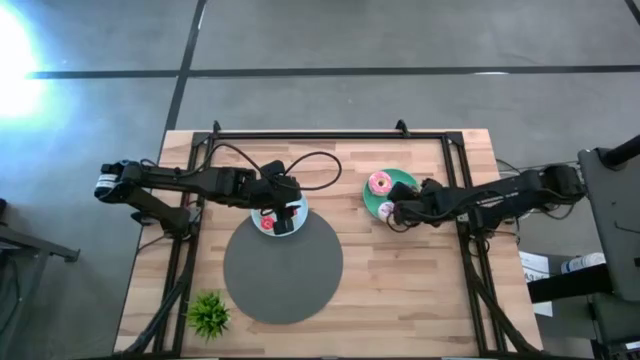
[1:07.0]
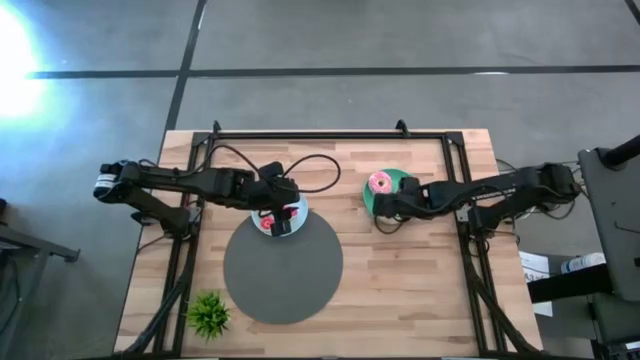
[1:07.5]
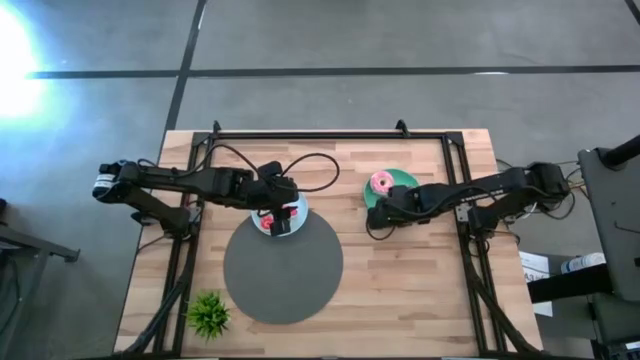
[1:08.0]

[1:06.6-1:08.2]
Task: Pick & Place donuts
Adjust the big purple donut on the blue plate

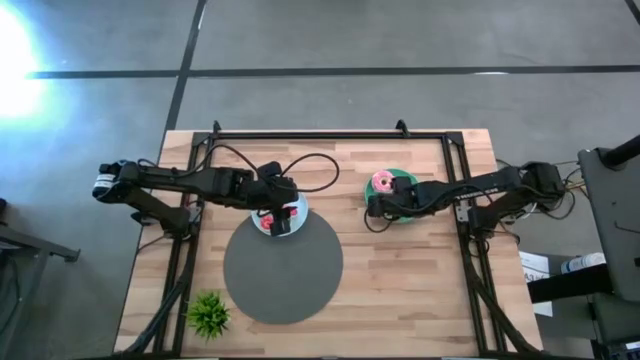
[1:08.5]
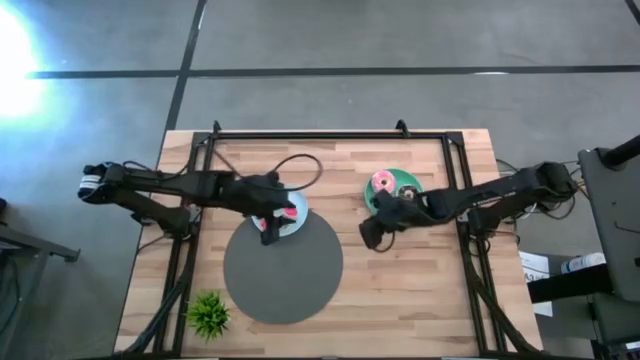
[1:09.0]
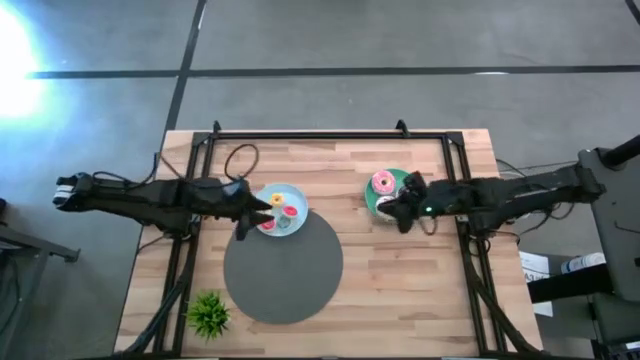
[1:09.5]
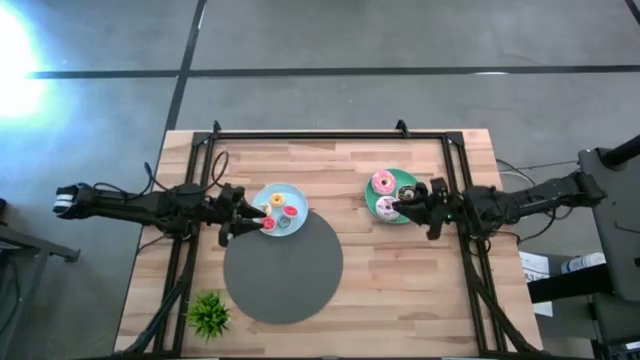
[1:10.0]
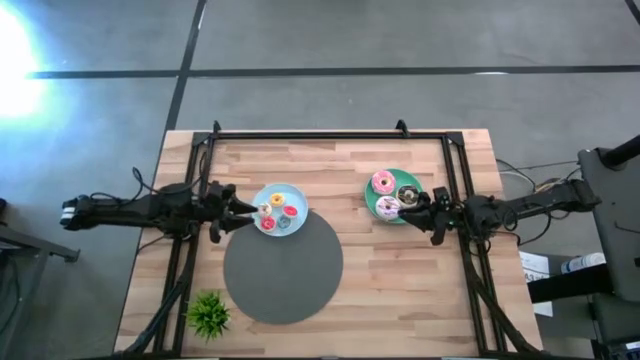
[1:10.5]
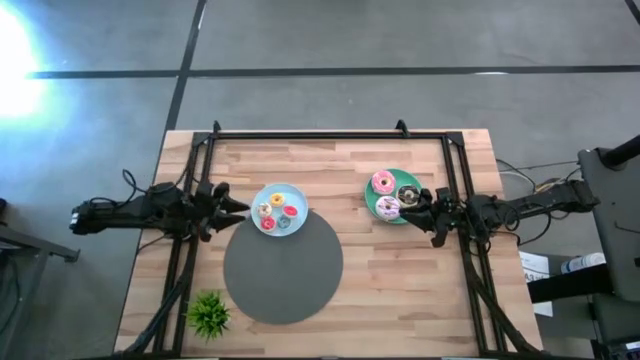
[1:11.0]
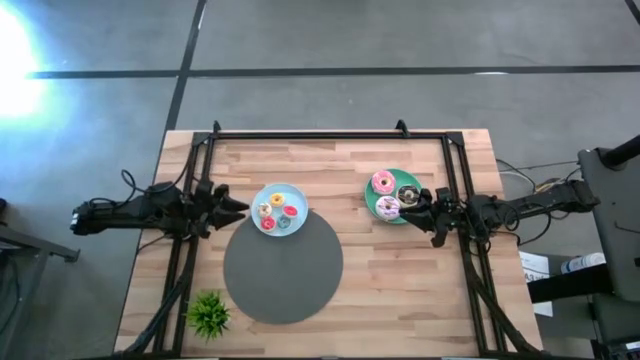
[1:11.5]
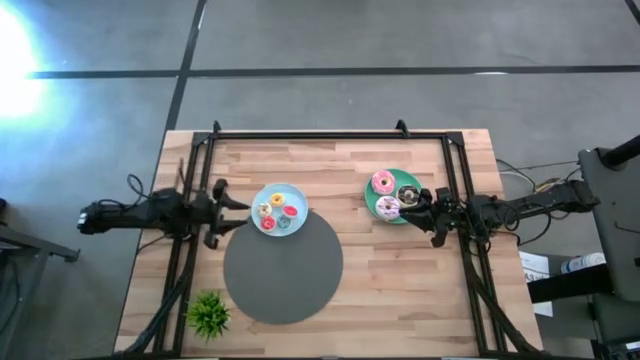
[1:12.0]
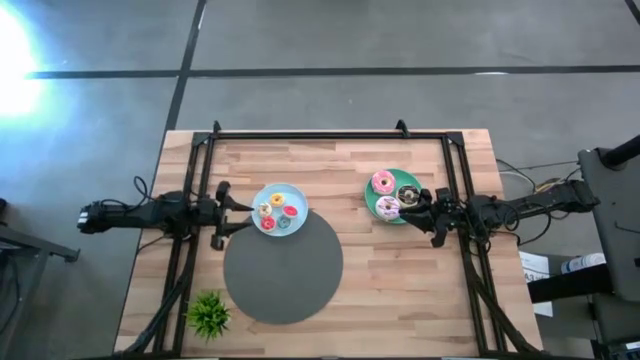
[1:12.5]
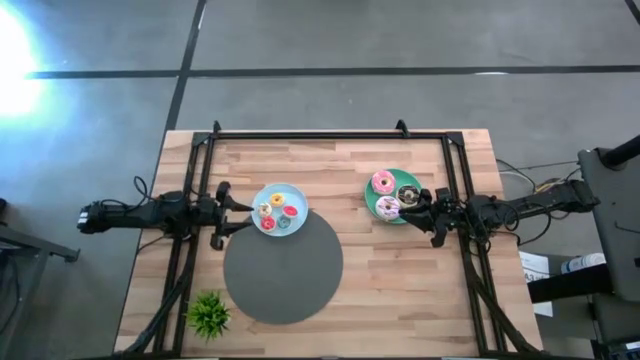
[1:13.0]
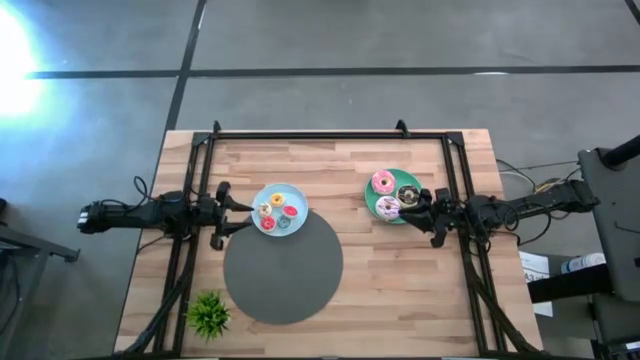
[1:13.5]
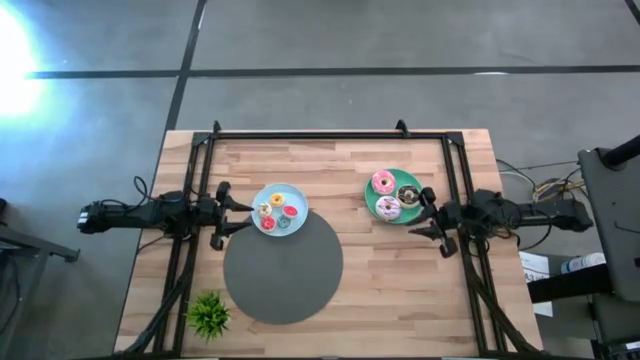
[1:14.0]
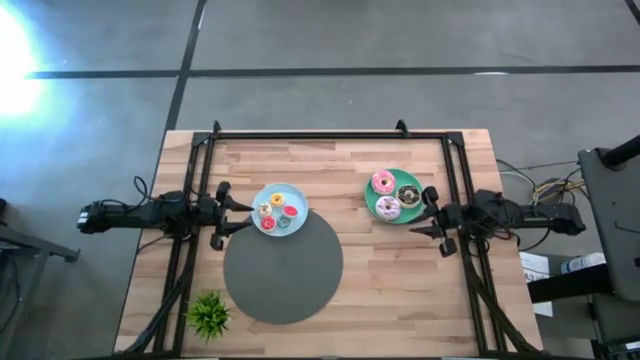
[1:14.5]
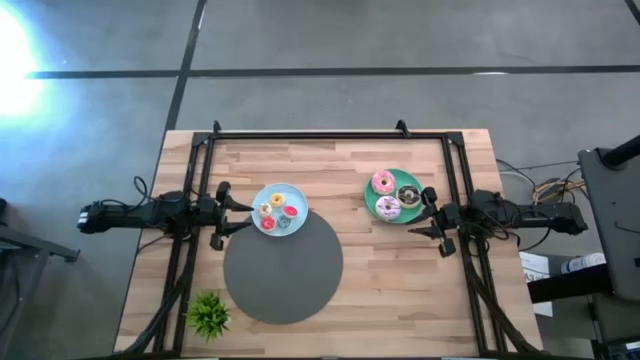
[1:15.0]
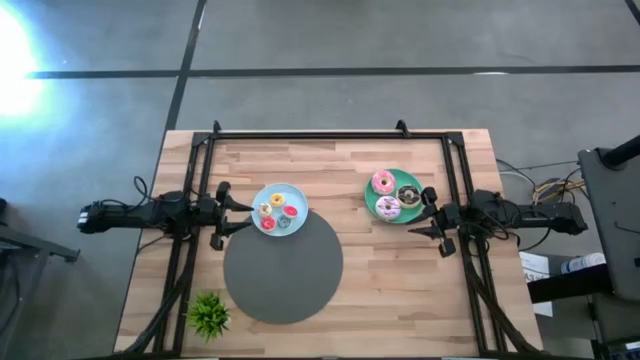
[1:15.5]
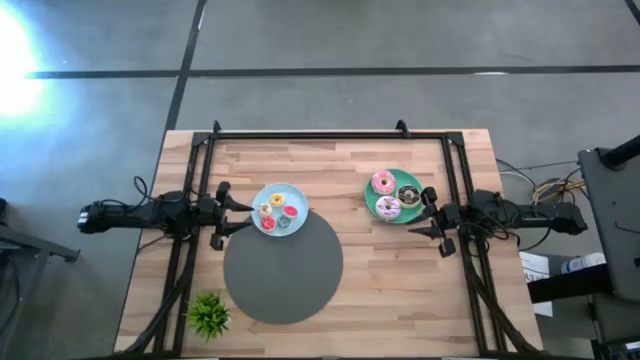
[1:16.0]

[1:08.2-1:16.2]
Return to Home Position

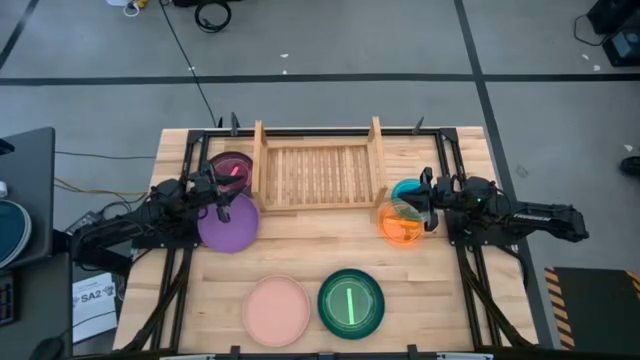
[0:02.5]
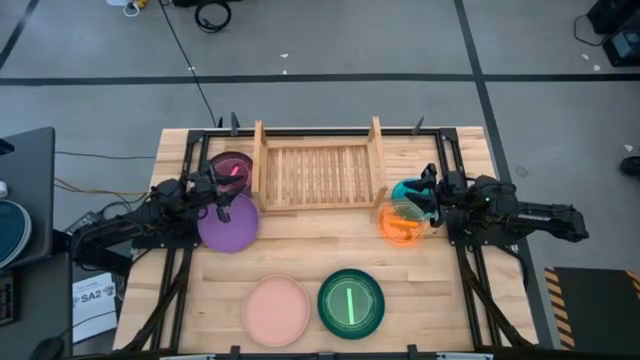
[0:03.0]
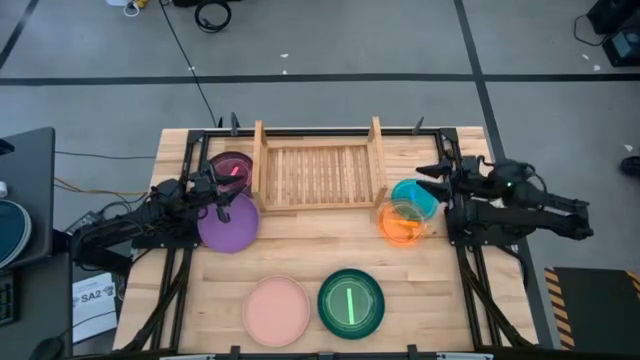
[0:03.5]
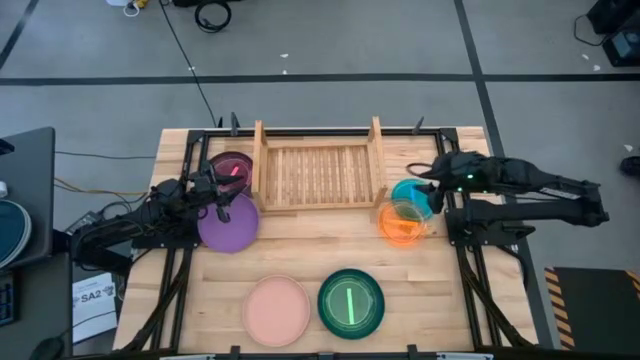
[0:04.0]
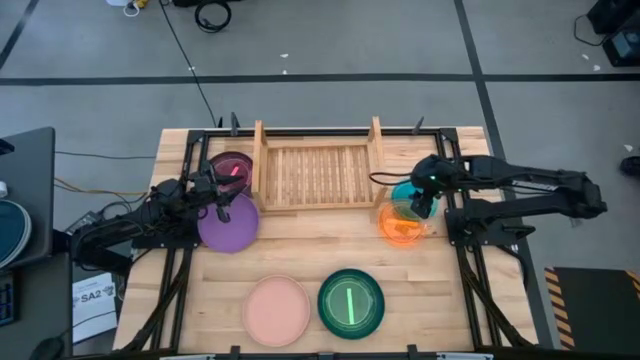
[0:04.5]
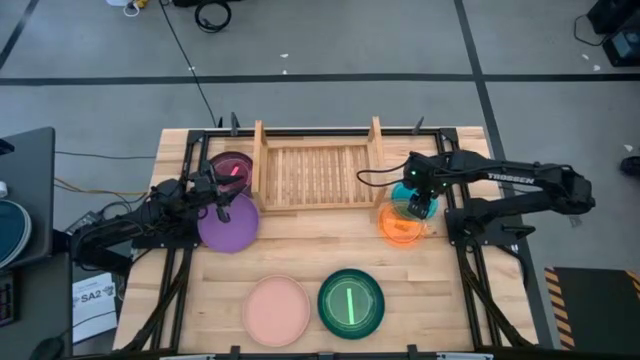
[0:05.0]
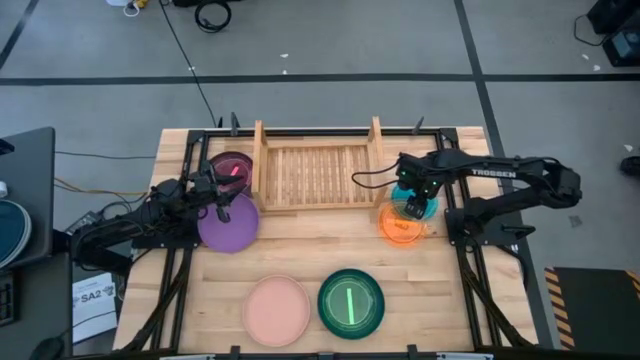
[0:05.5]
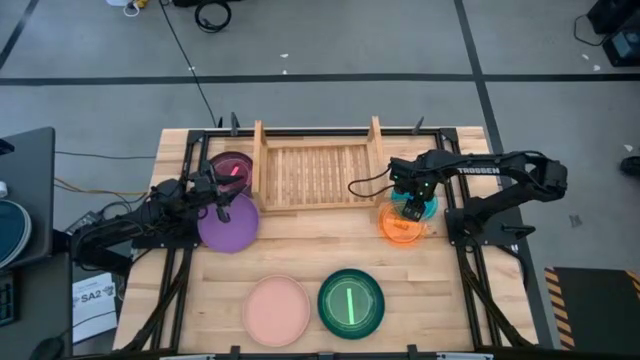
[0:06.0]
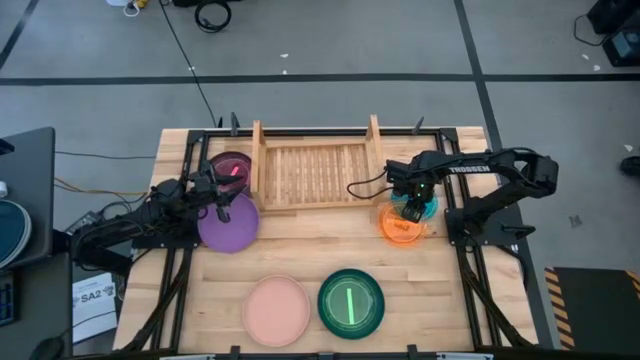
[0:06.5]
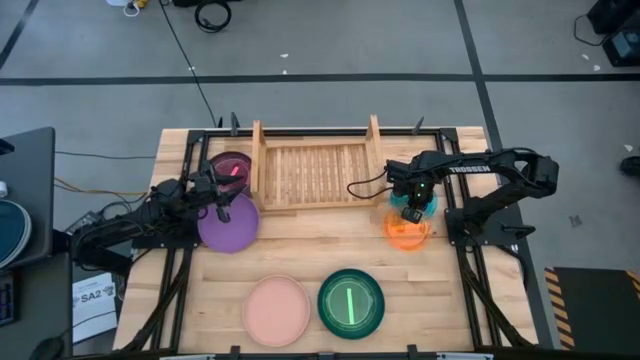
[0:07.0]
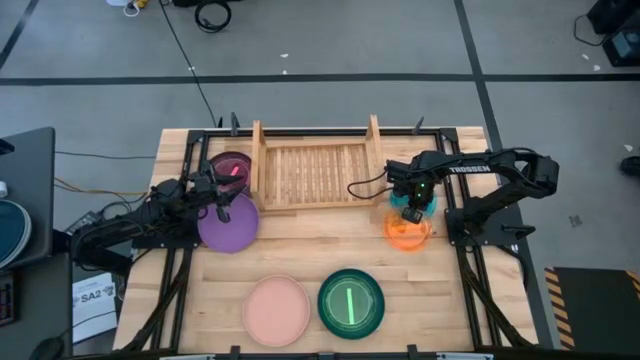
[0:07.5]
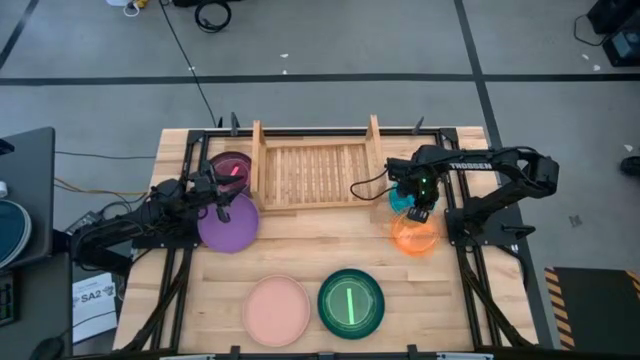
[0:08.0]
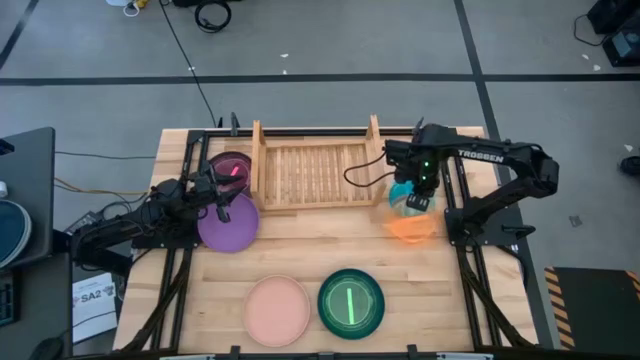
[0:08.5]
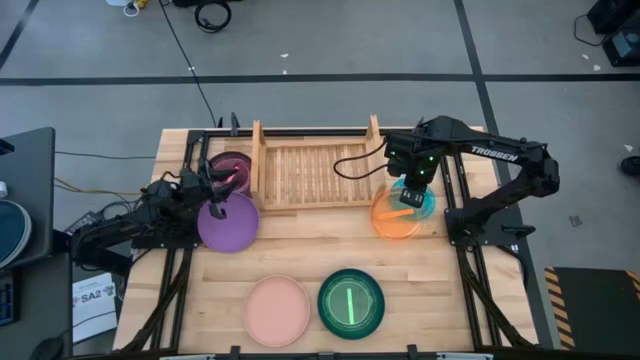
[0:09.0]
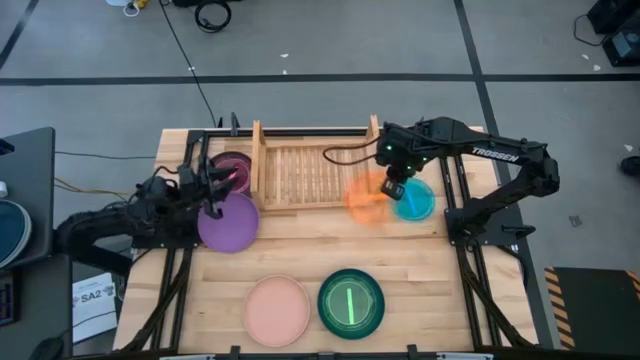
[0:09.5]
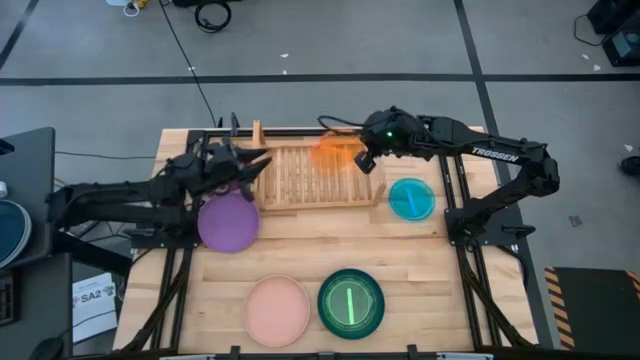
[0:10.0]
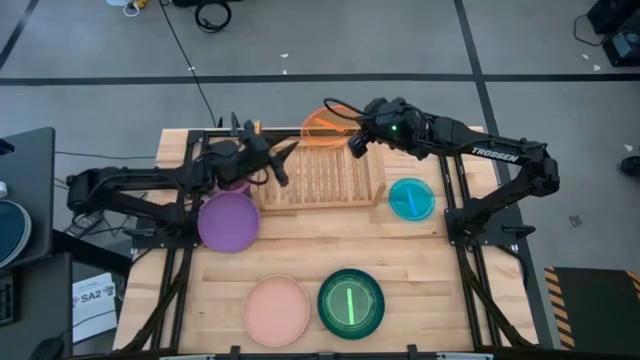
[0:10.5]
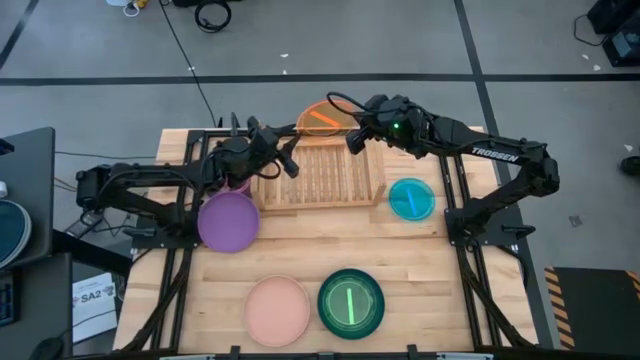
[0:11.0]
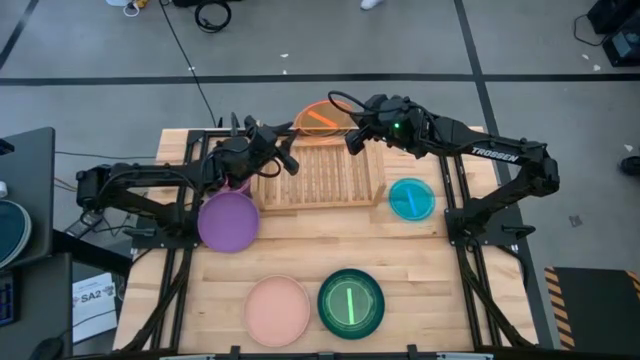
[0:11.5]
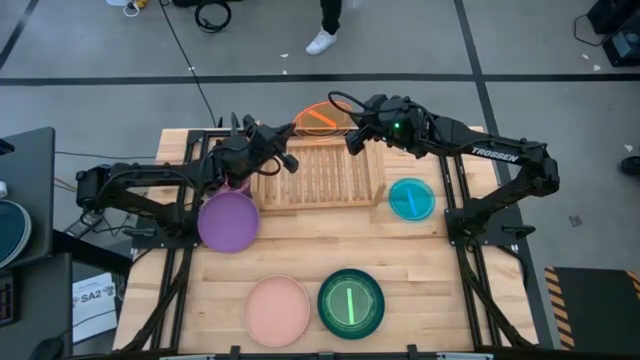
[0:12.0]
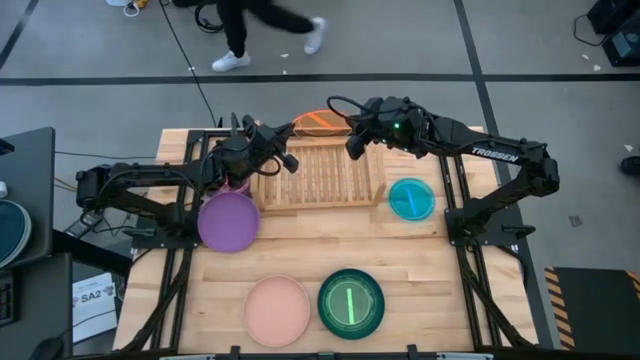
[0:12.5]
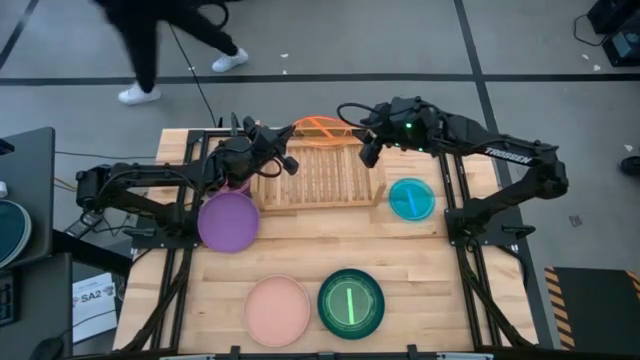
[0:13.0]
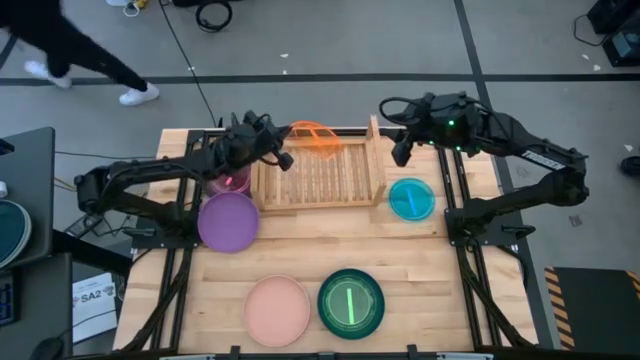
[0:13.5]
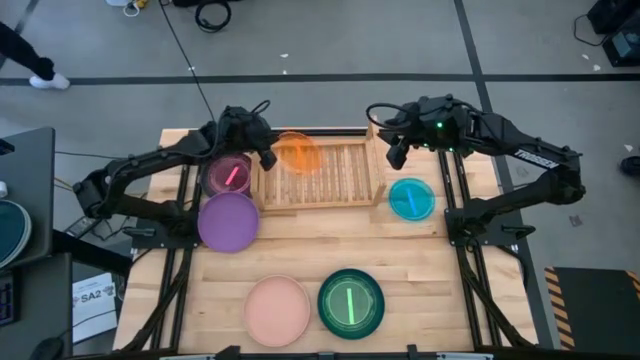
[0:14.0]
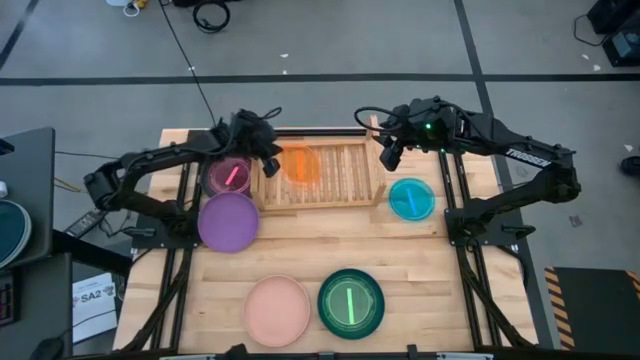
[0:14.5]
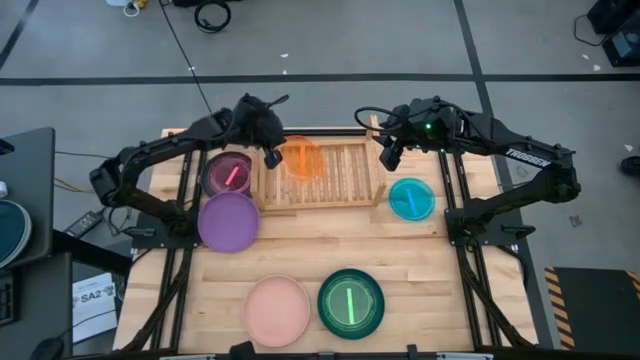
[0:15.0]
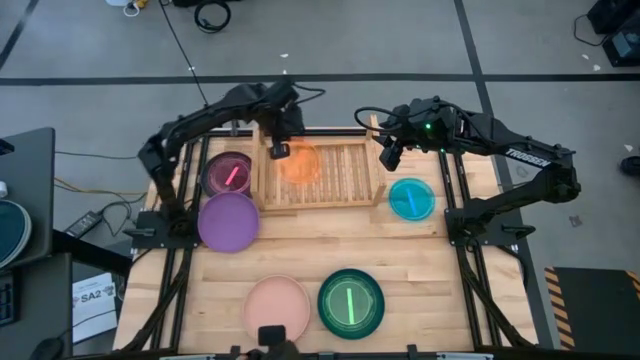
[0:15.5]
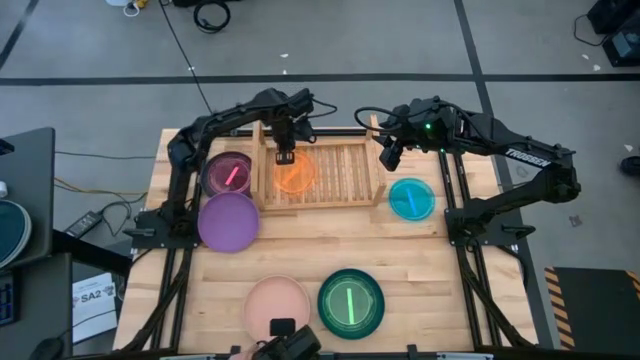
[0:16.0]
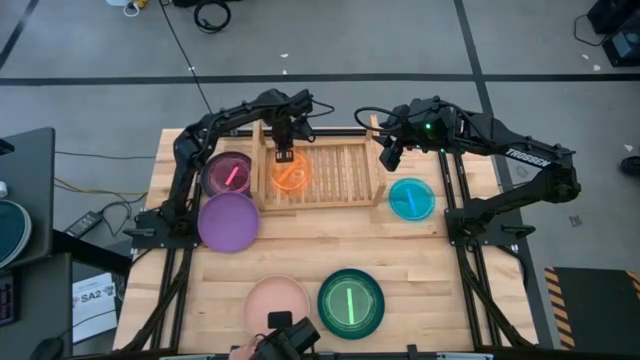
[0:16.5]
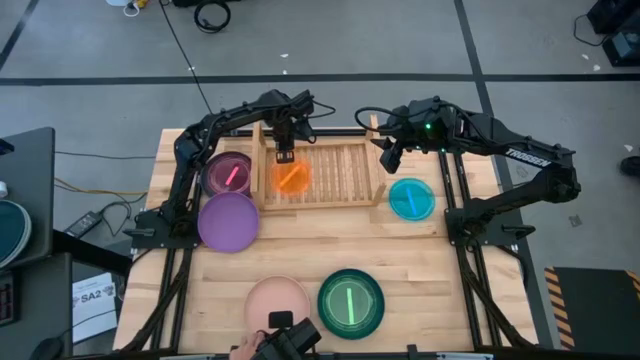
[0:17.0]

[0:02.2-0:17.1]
Task: Place and stack plates onto a shelf
Put the small orange plate on the shelf
